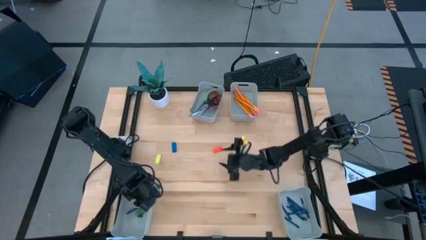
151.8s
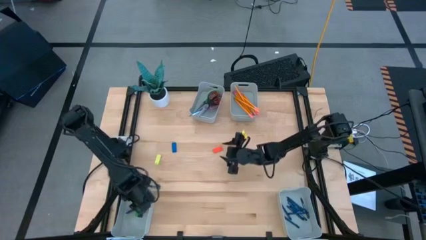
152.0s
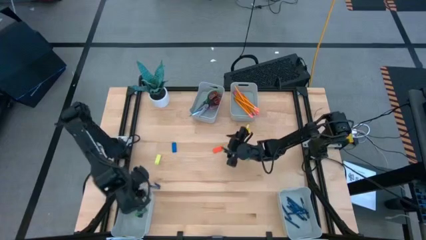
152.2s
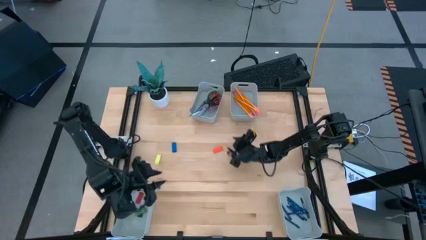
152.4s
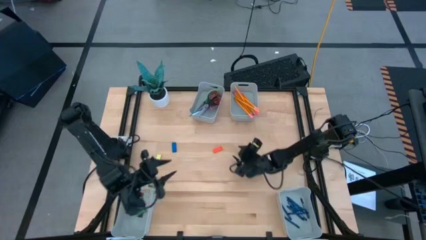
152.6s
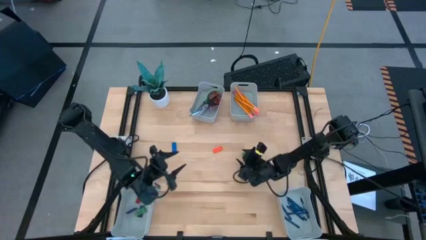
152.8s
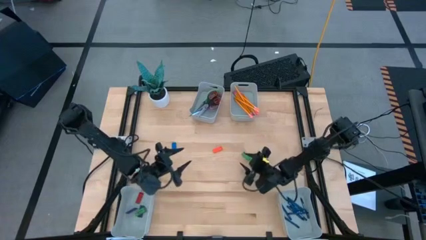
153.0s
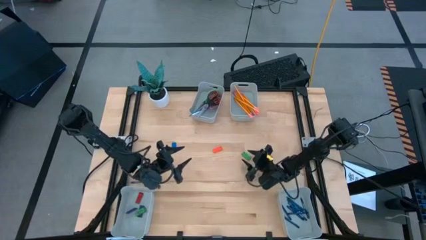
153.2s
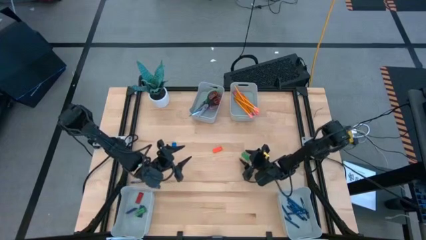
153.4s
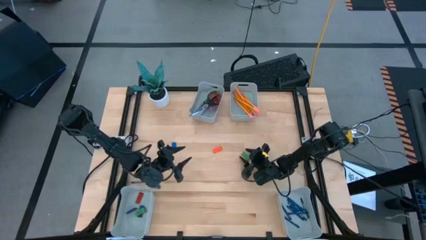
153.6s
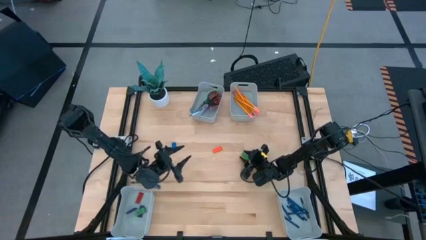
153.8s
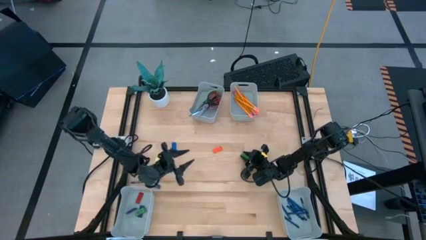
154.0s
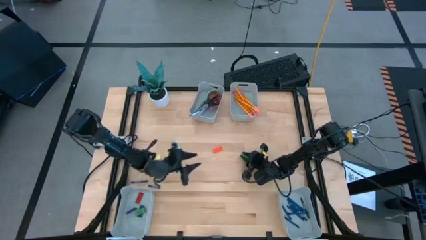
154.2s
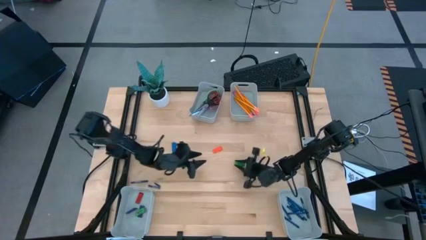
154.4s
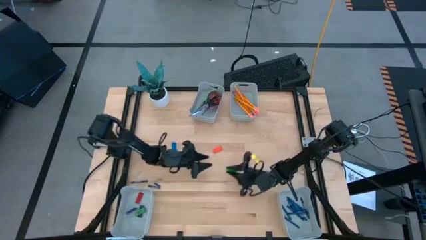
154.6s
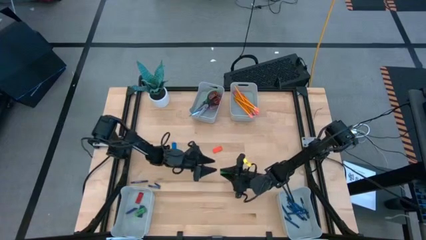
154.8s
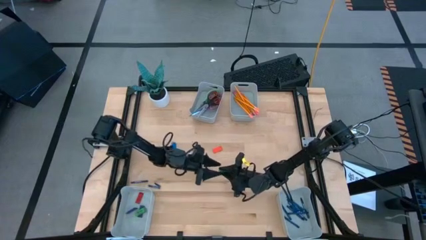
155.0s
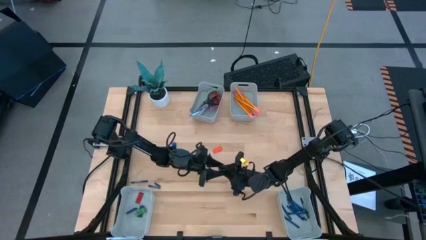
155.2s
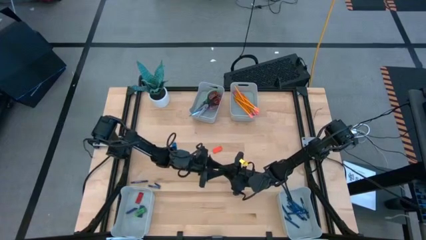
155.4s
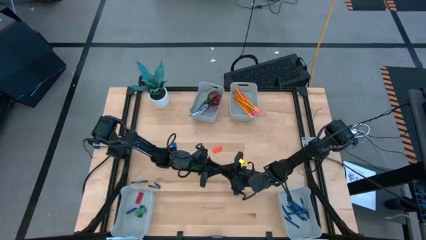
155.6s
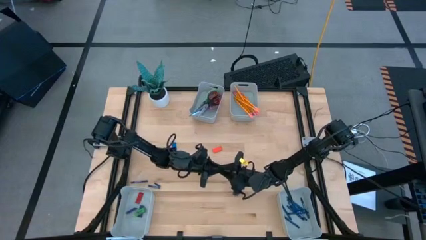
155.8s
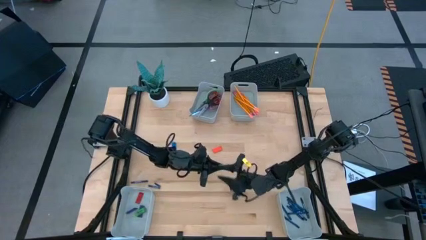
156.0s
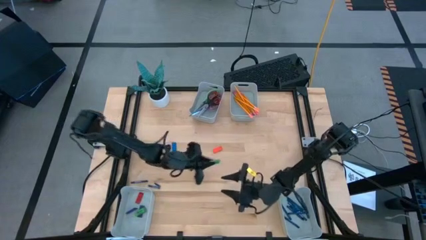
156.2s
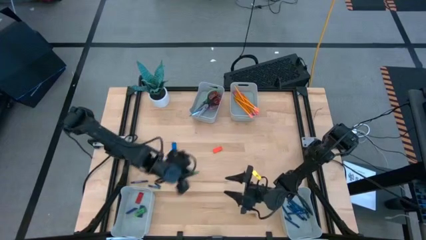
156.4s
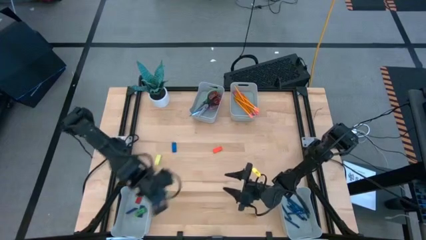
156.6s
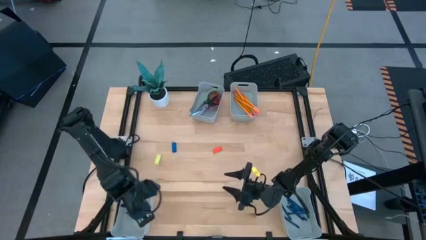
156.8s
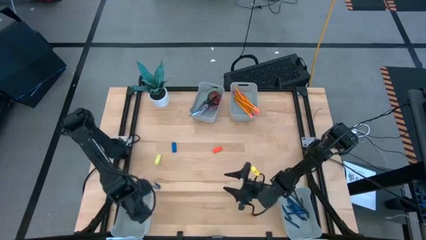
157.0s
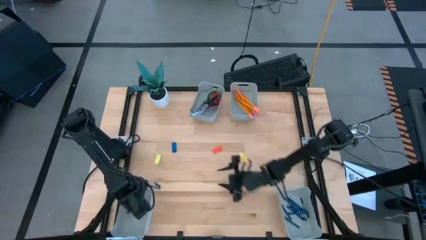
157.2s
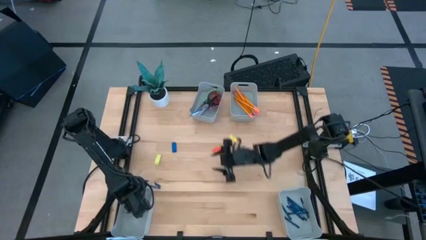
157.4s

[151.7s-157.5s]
Task: Sort crayons/erasers/pens/pencils in bins
Put the green eraser into the bottom left bin

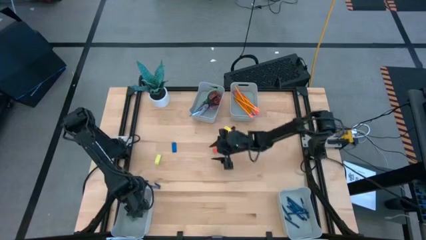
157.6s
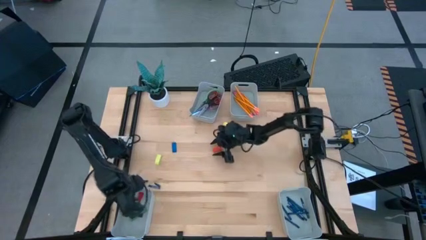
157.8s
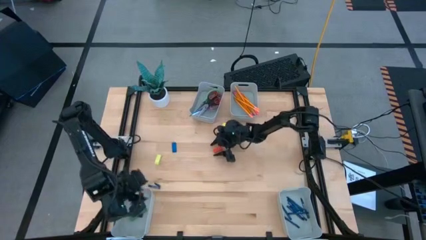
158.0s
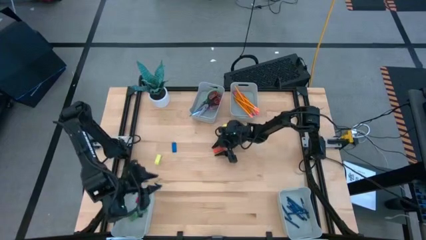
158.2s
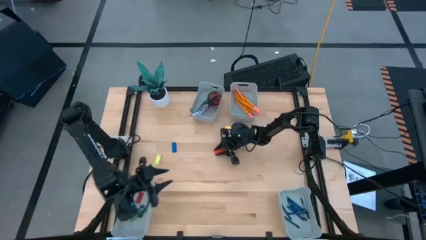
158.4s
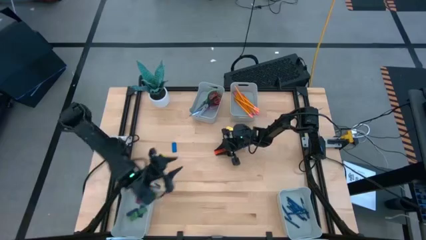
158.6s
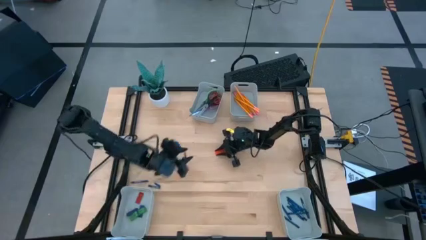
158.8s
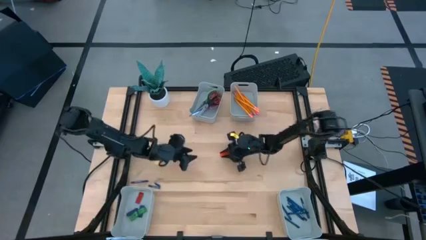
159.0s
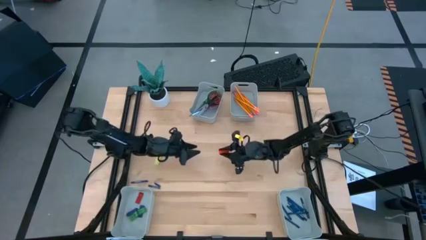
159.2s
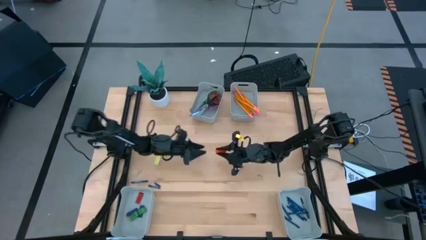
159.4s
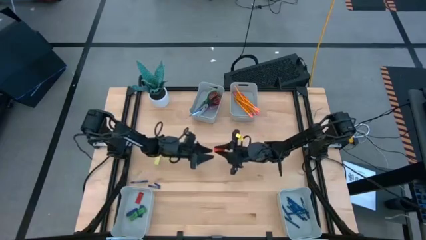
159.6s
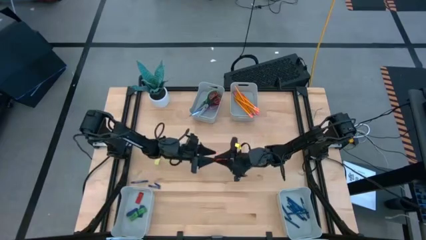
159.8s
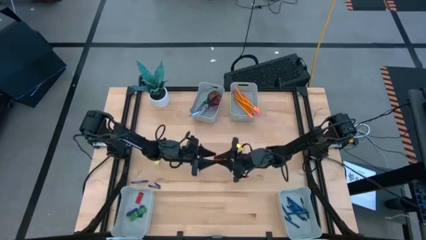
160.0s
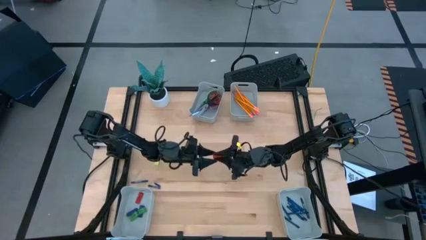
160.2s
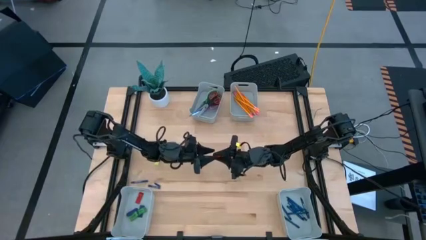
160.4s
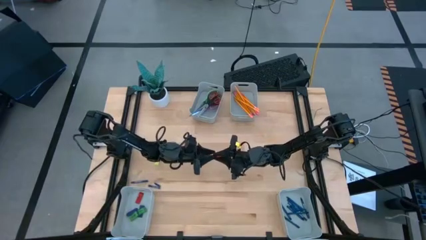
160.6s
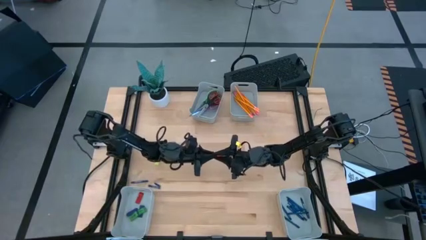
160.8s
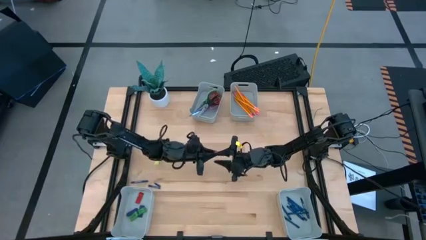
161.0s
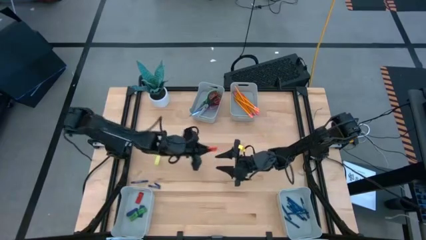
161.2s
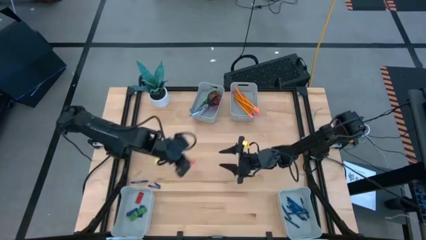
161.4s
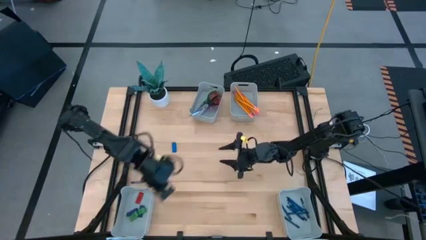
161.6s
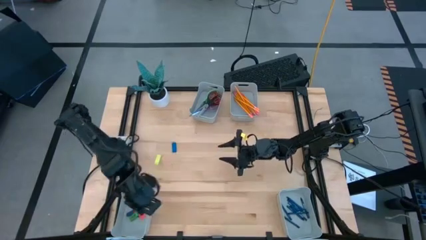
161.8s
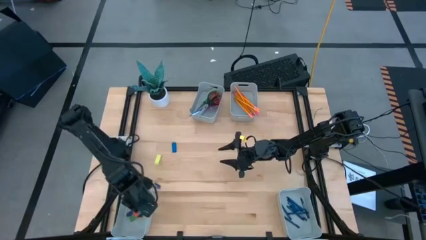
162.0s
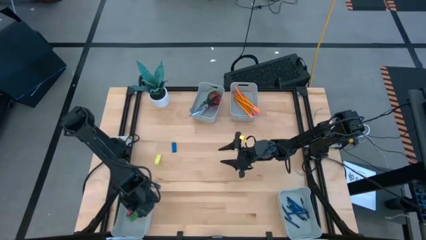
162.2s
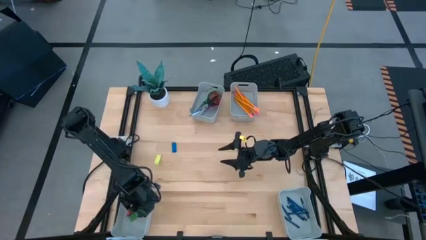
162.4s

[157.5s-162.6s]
Put the orange eraser into the bottom left bin

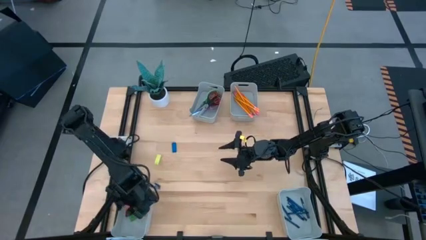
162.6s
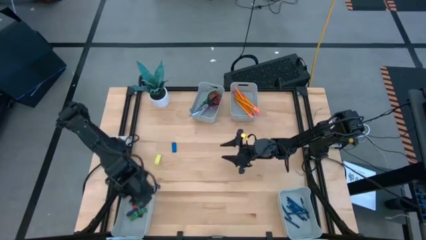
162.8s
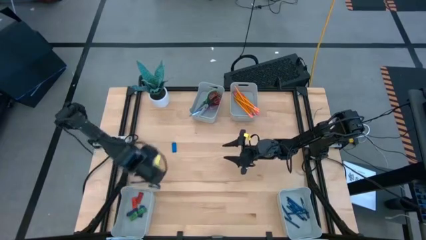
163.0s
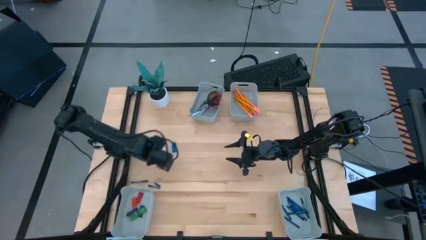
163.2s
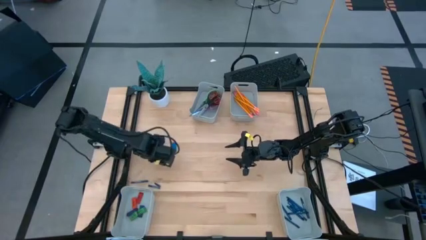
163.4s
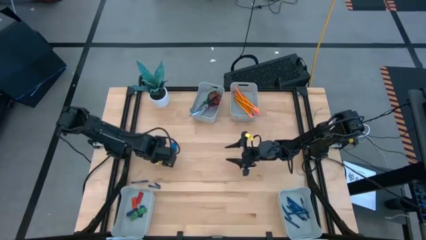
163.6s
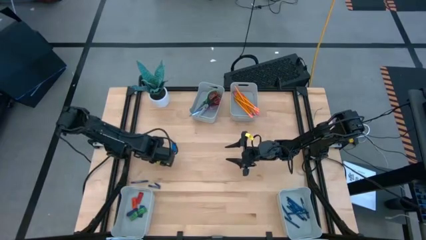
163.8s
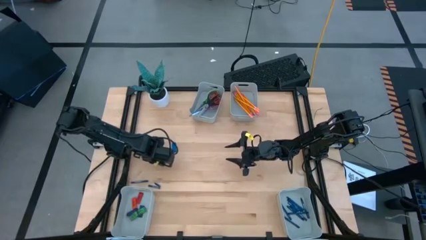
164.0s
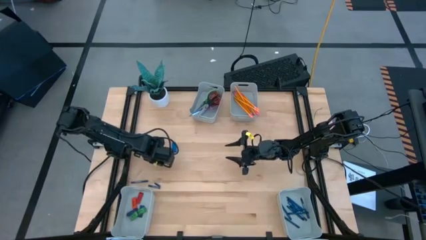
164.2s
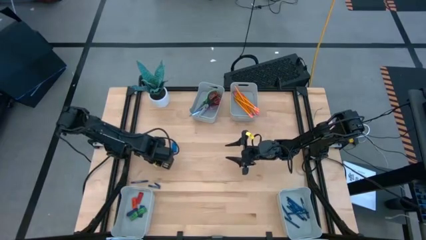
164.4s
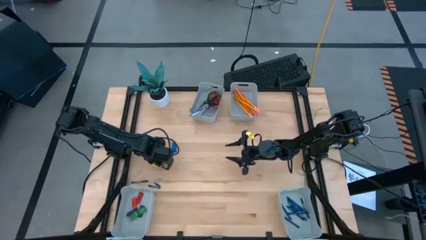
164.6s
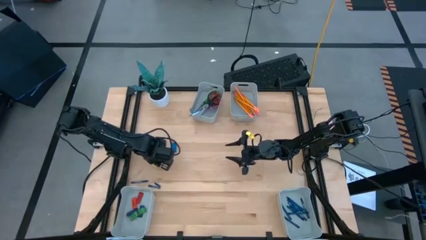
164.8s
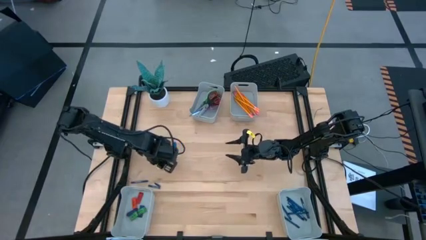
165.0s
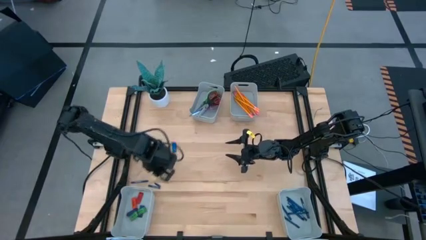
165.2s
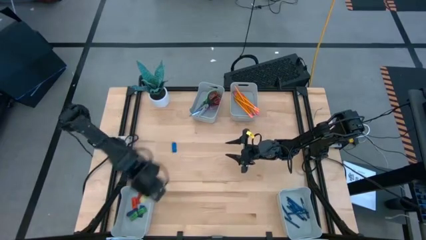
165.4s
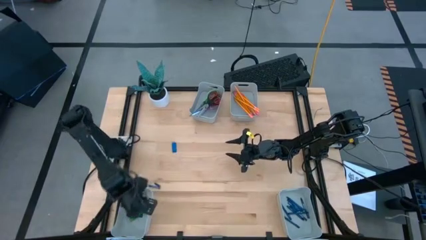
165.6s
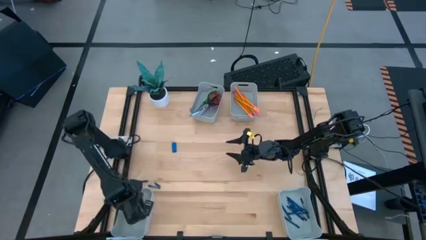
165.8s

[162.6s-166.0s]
Put the yellow eraser into the bottom left bin

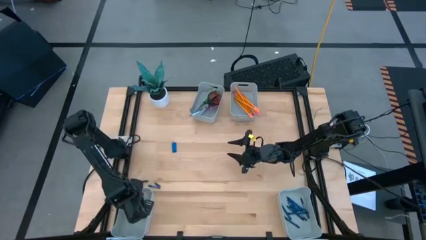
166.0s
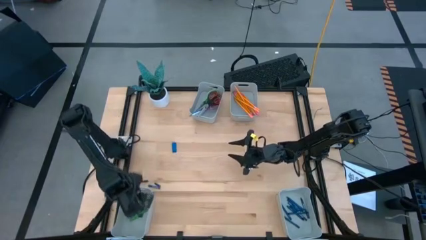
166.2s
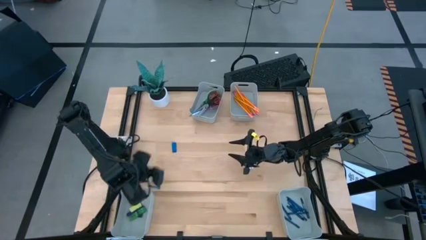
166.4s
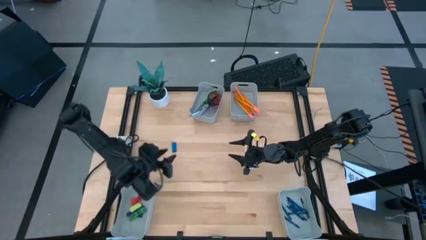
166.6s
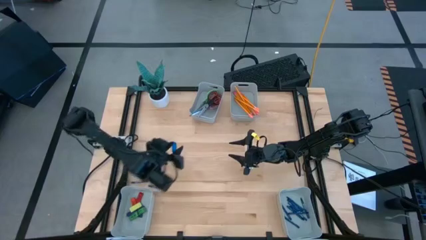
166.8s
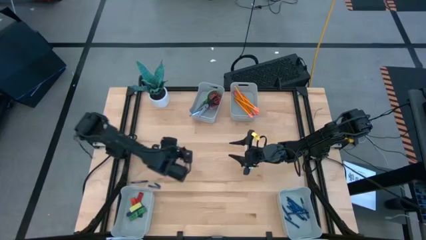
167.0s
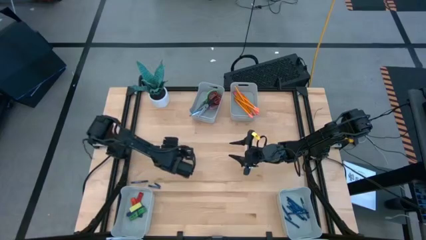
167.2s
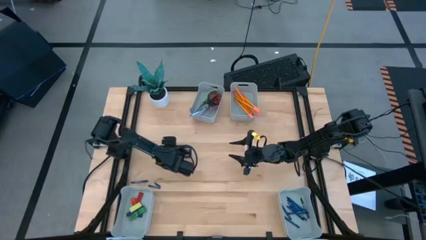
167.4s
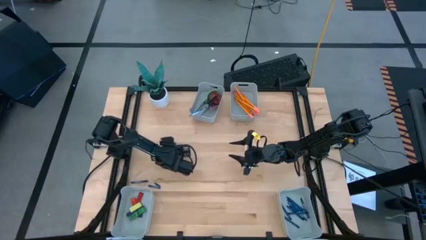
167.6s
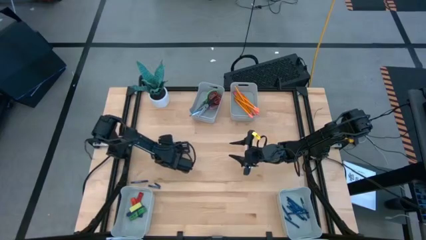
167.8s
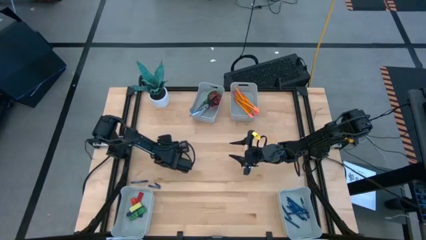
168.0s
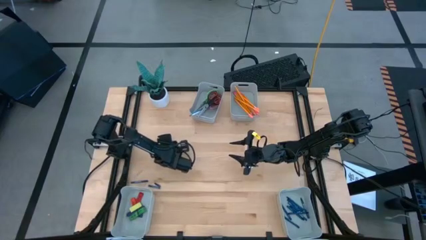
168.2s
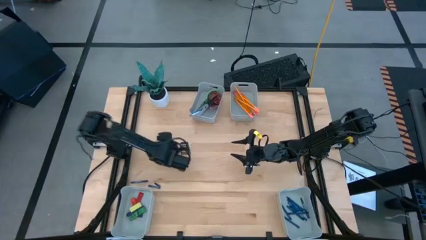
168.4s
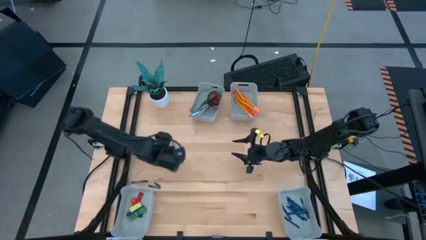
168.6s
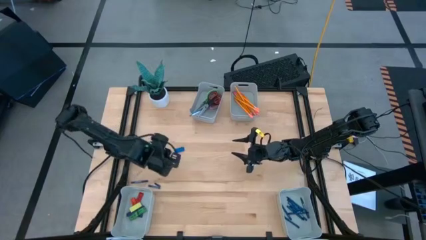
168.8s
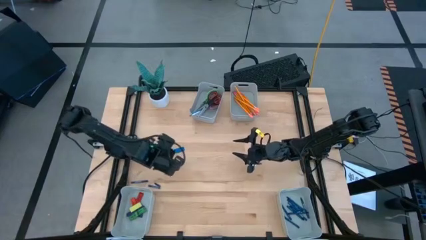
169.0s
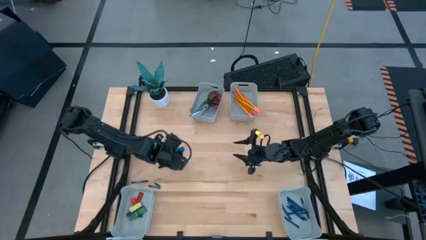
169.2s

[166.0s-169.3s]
Put the blue eraser into the bottom left bin
